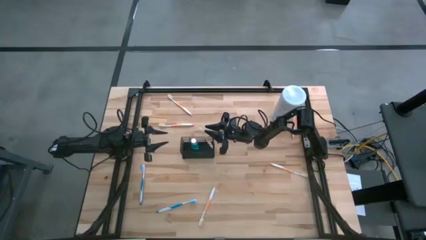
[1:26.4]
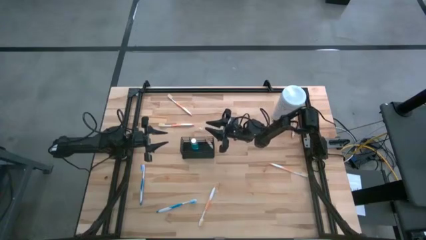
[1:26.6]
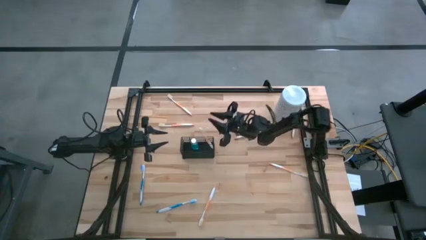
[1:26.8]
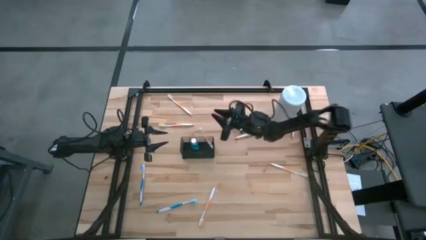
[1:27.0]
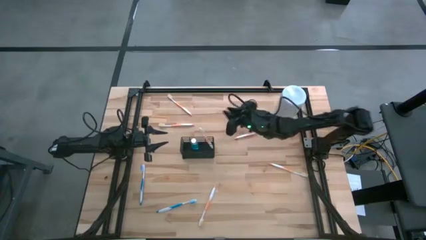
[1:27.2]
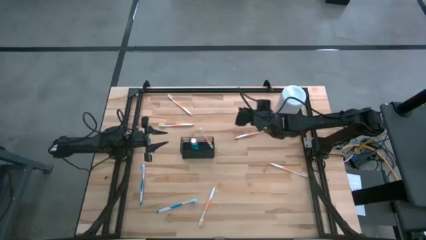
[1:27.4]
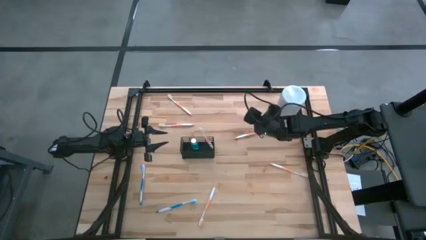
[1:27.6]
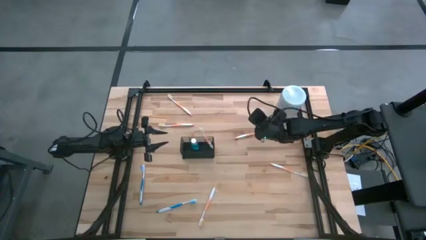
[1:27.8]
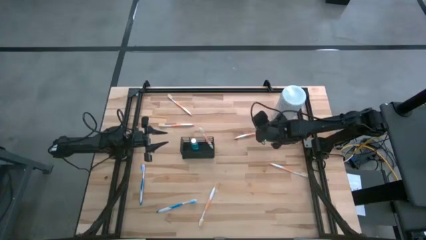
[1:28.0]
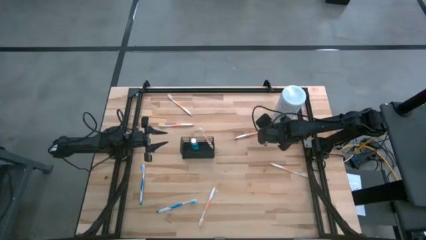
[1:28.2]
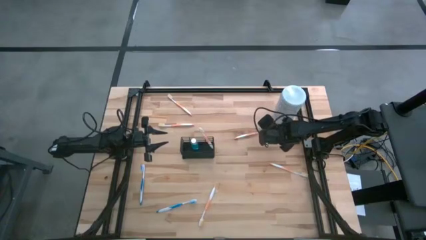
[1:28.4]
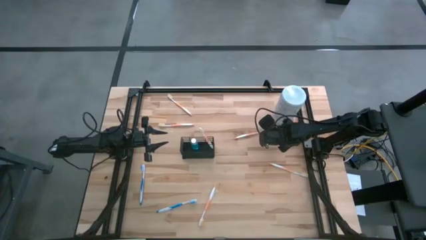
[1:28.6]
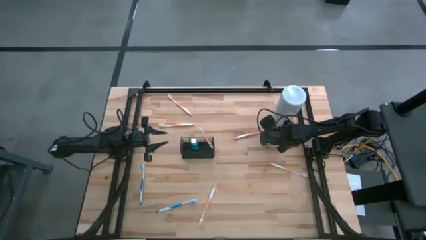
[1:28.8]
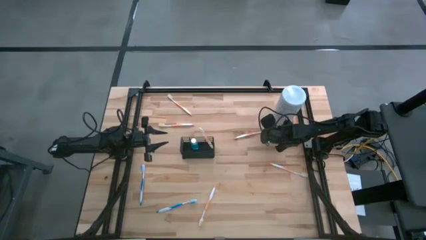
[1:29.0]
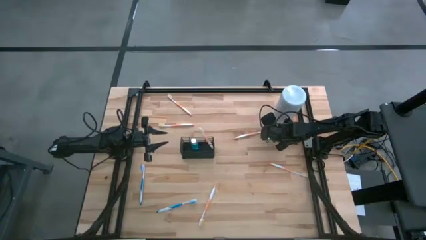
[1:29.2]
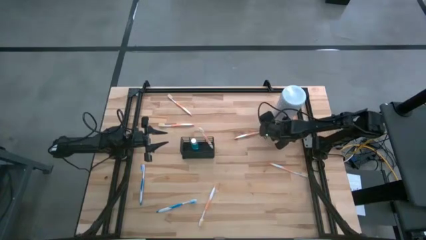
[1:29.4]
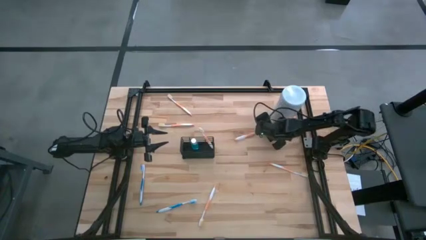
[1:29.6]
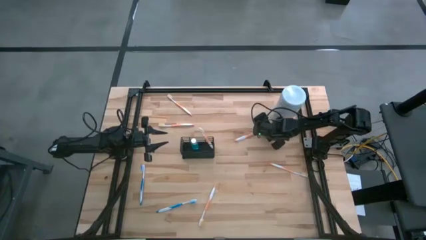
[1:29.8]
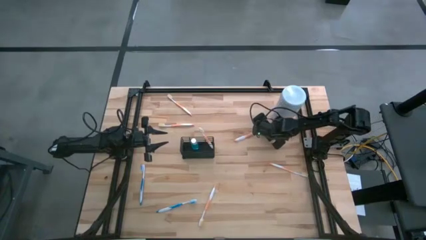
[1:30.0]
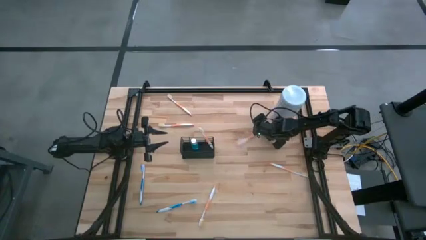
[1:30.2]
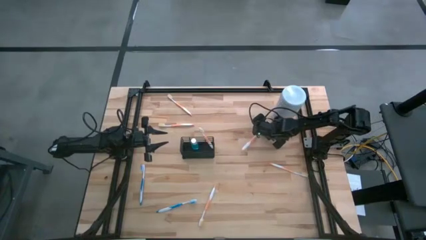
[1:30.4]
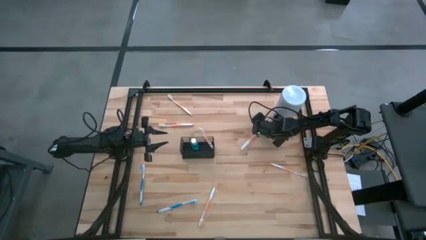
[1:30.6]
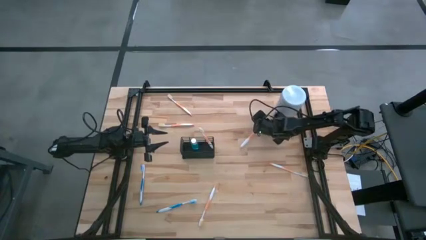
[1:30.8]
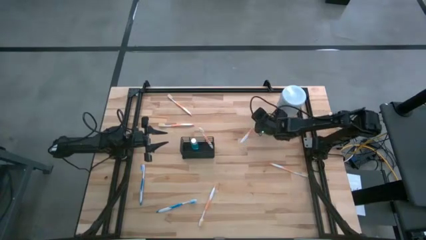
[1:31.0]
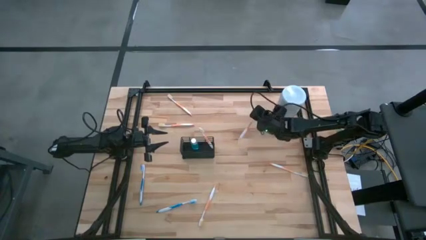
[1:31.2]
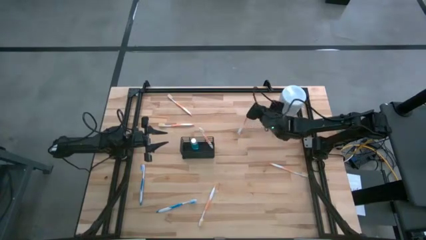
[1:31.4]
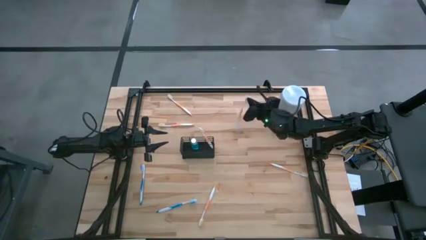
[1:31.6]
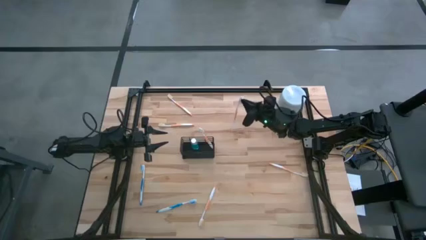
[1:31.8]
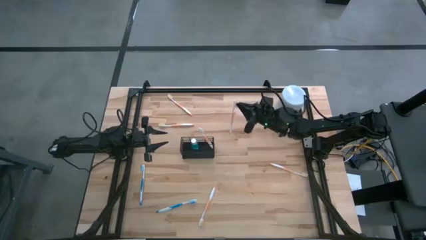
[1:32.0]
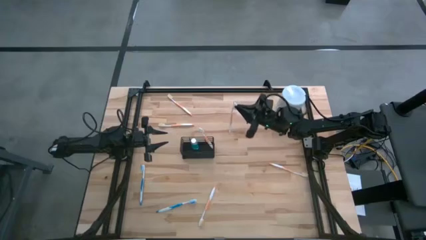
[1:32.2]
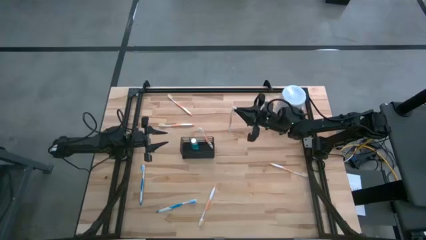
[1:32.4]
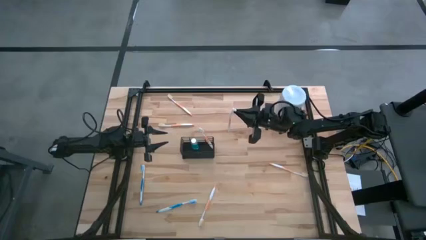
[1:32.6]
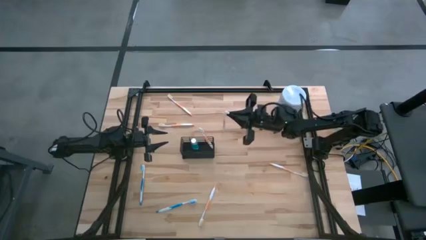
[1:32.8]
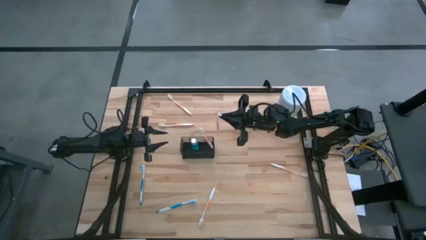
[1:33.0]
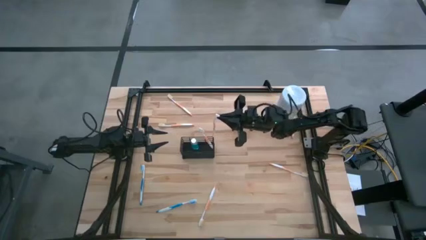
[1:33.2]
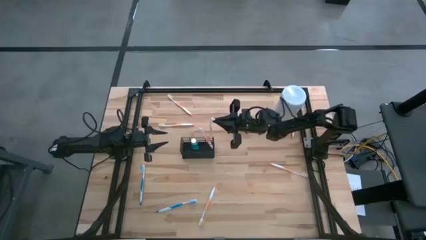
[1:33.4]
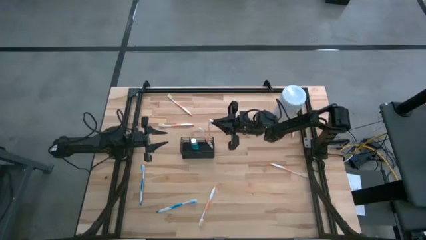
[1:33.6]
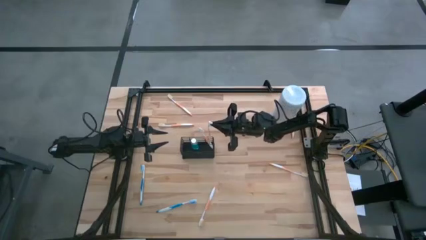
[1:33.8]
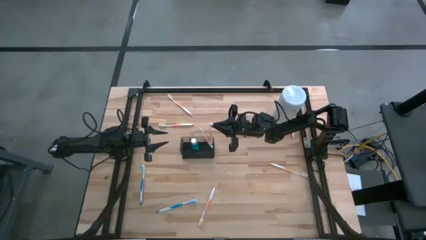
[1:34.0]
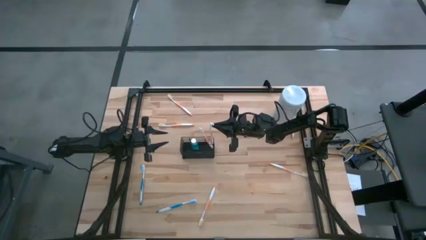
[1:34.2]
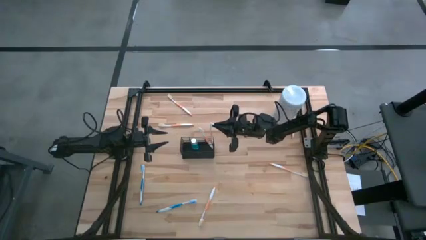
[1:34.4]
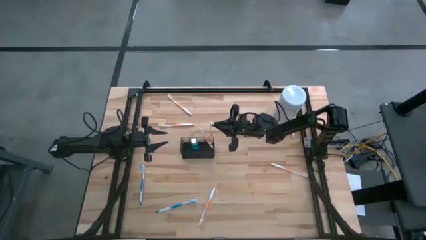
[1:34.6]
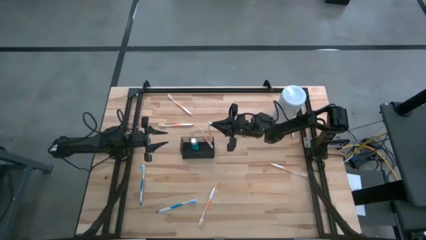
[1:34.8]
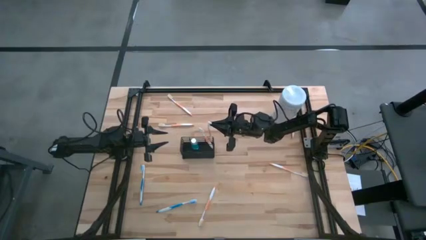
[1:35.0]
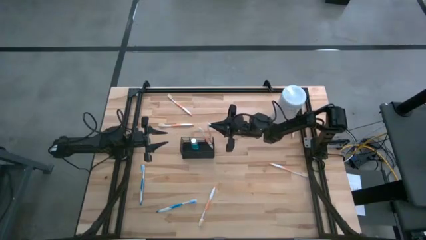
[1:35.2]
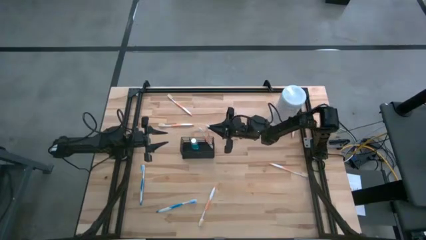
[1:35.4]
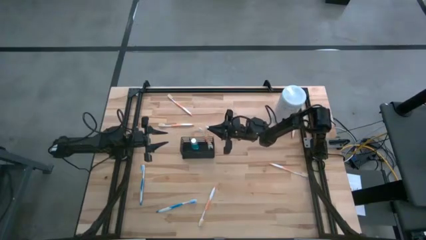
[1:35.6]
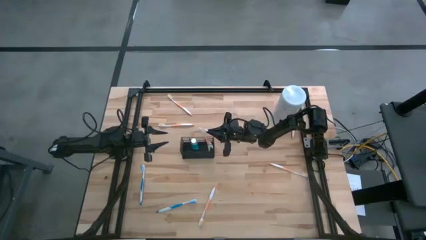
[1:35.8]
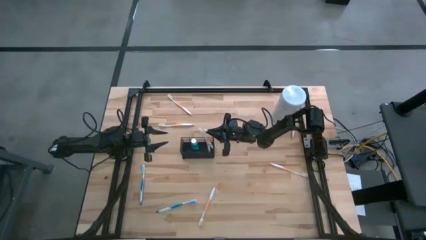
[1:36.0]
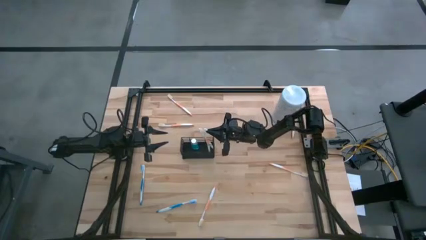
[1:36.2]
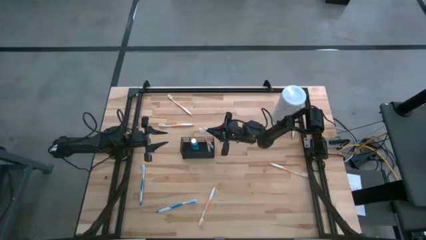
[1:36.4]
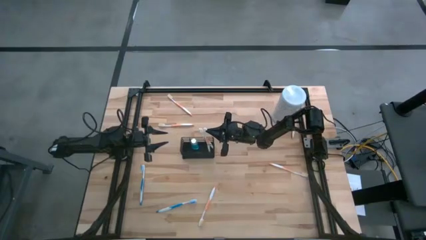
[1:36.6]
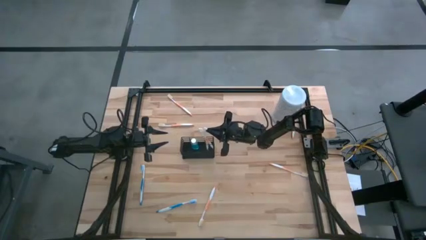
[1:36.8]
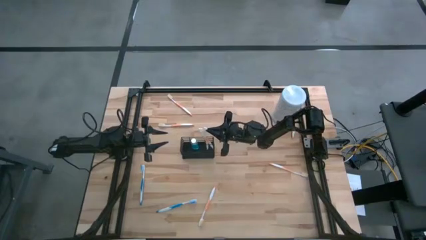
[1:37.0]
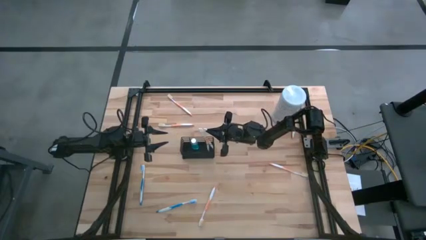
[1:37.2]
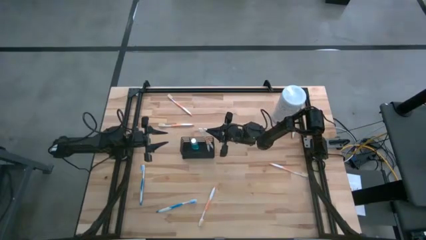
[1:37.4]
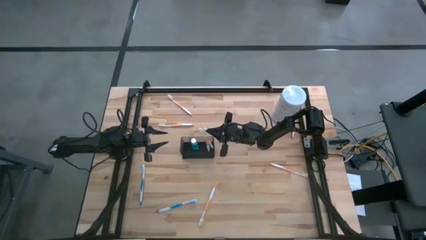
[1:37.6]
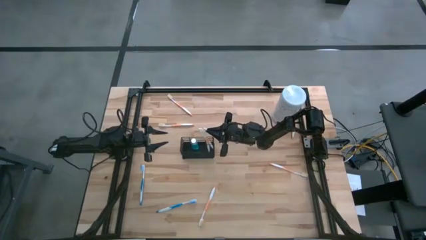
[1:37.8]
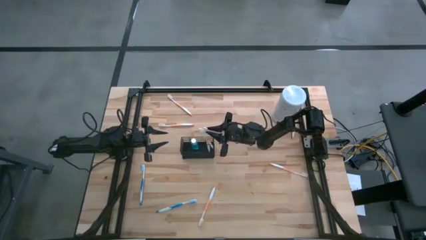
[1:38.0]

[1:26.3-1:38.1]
Task: Pick & Place toothbrushing station
Put the orange toothbrush into the right section of the wire organizer

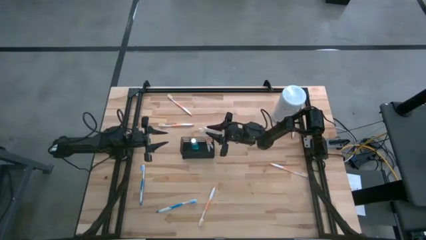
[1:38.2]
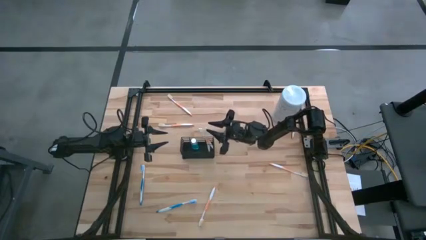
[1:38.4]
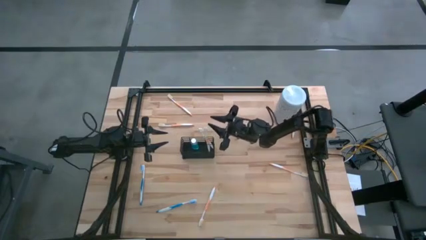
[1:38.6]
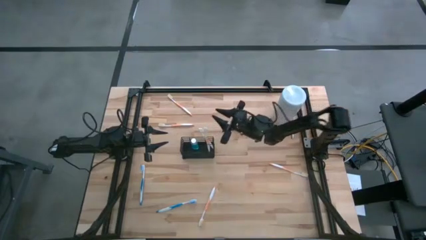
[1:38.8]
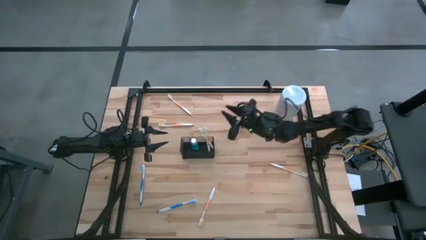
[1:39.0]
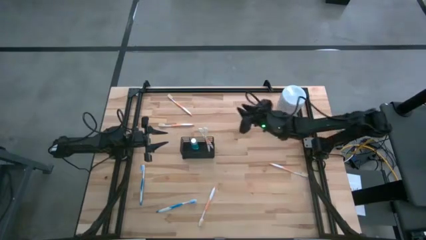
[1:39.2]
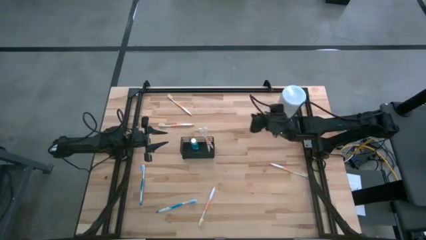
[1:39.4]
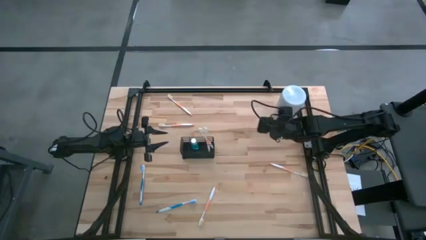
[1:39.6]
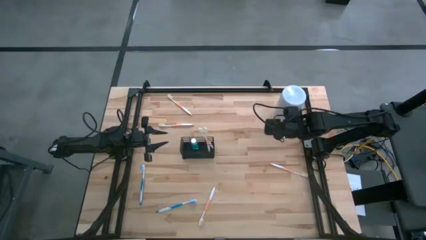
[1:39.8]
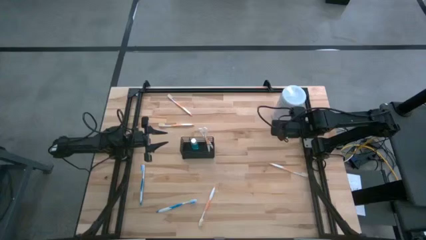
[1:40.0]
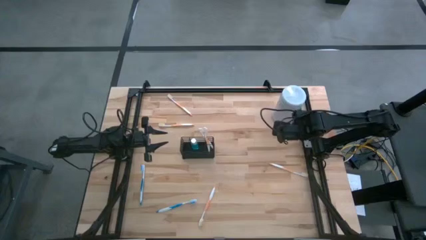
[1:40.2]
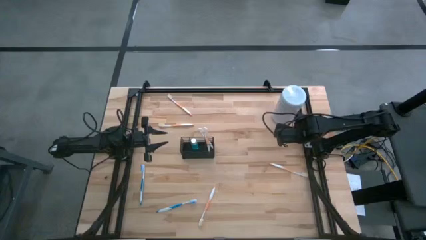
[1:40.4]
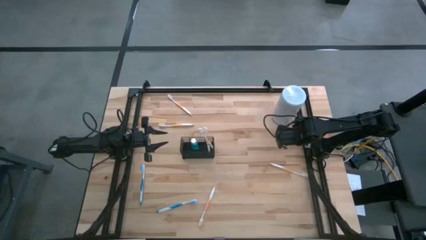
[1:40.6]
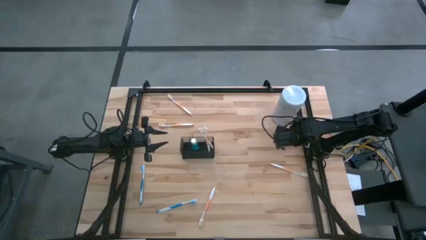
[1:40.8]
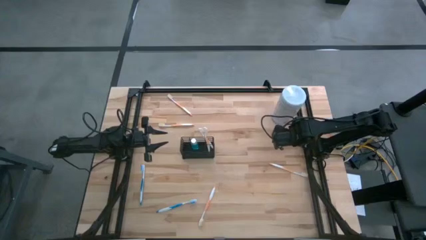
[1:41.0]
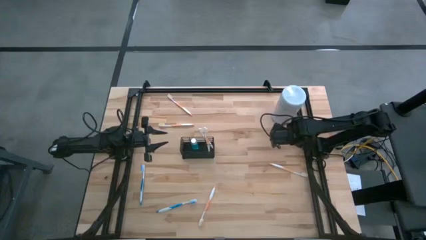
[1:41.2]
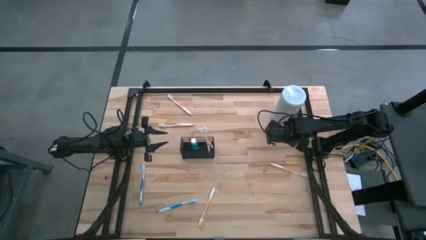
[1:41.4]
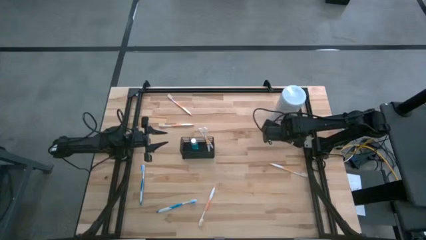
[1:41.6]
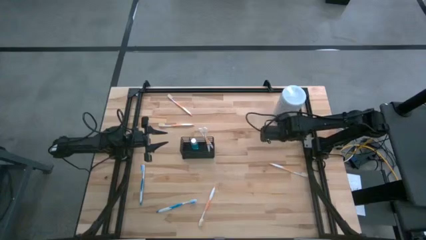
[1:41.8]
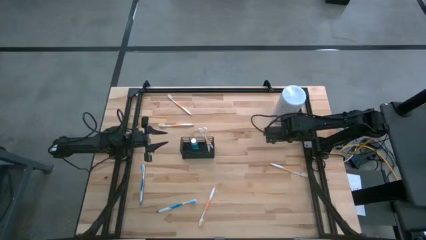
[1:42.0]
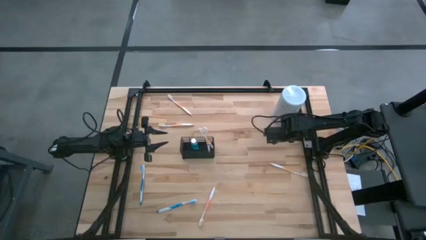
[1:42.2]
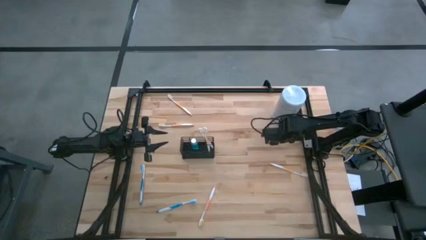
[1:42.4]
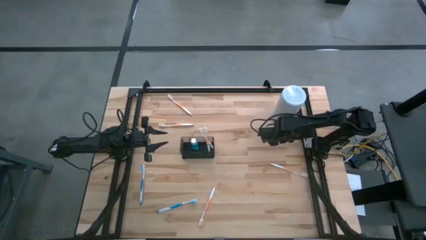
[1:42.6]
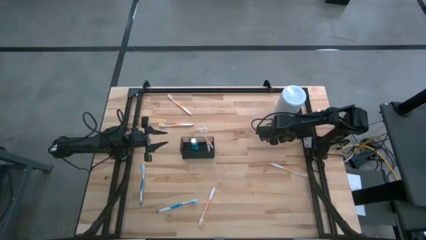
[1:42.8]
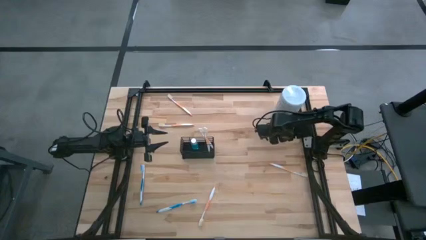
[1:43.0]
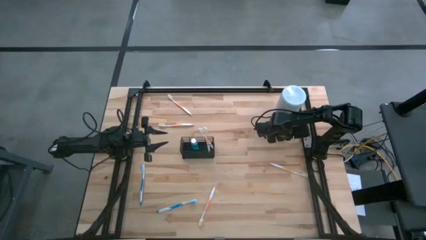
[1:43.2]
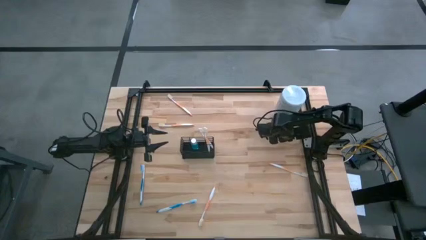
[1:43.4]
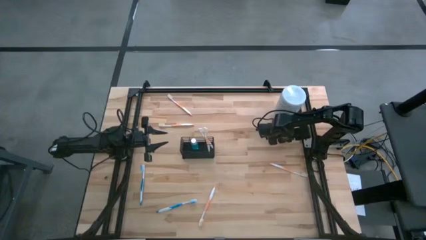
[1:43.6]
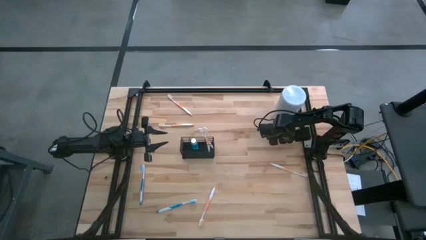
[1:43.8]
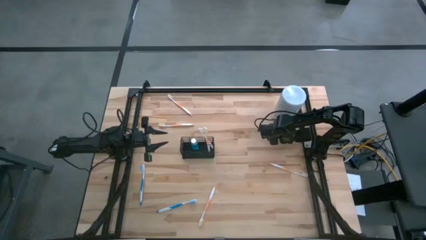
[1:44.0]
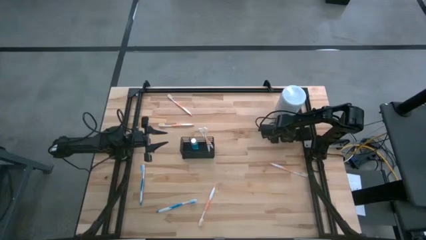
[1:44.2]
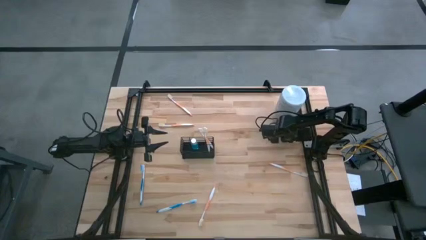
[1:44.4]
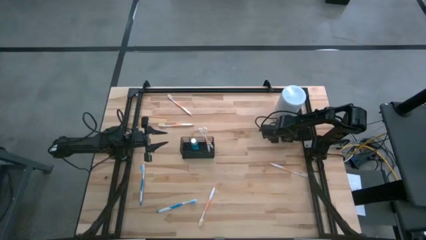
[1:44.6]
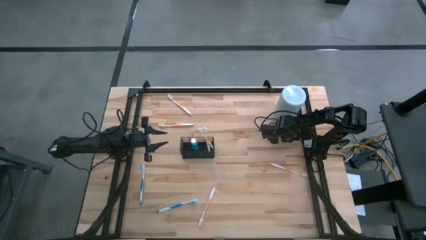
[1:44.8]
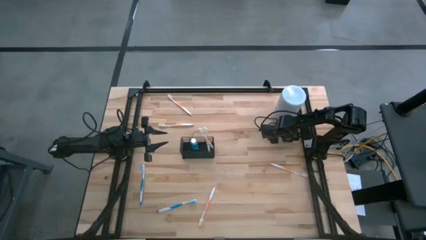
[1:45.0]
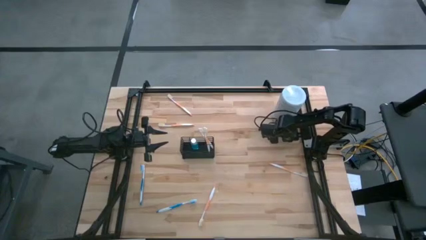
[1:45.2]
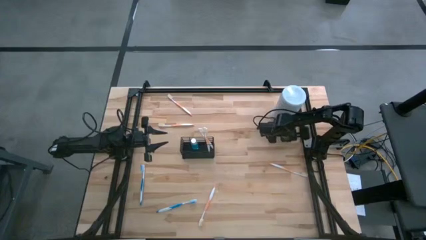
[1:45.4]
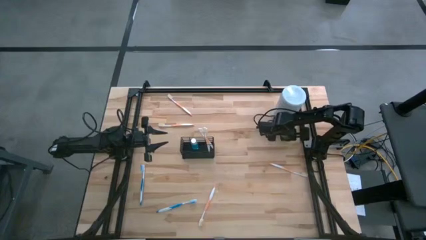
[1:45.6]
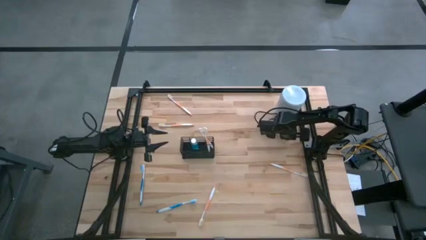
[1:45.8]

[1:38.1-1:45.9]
Put the orange toothbrush into the right section of the wire organizer
